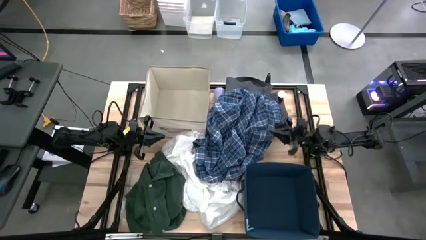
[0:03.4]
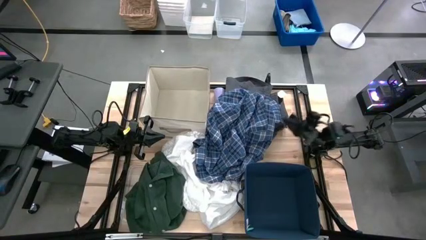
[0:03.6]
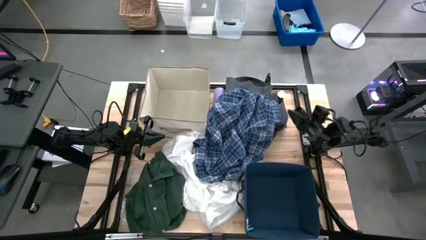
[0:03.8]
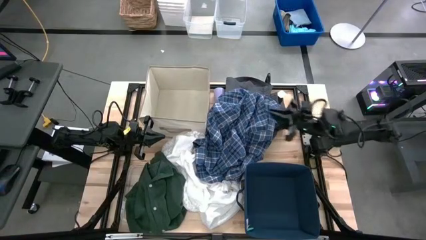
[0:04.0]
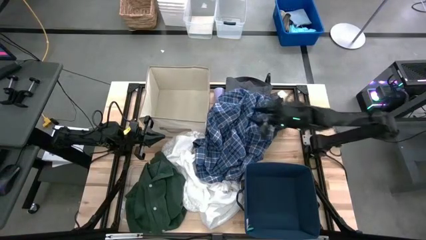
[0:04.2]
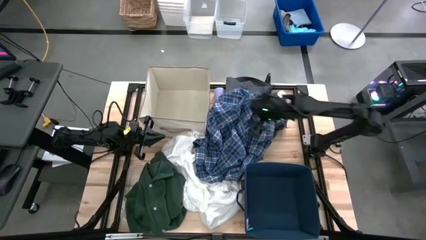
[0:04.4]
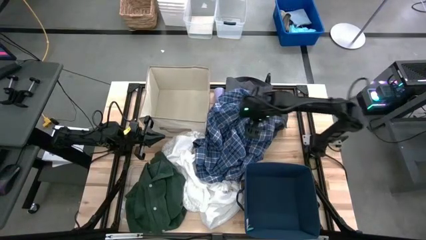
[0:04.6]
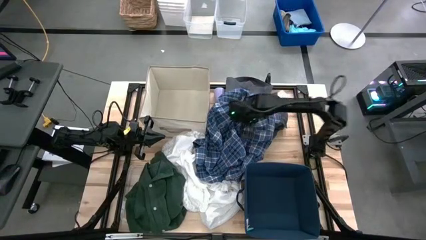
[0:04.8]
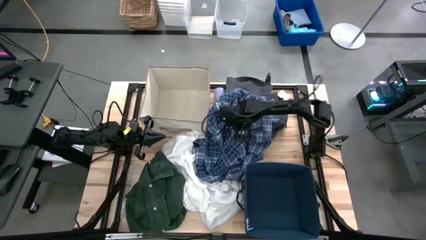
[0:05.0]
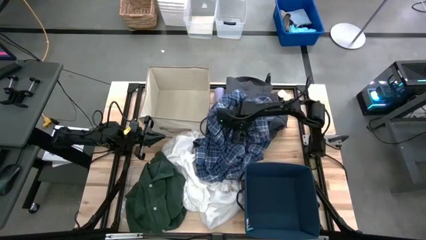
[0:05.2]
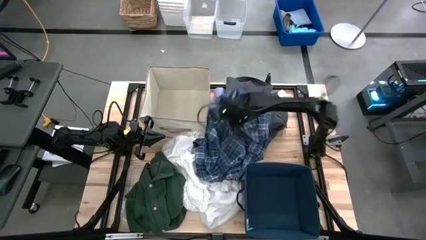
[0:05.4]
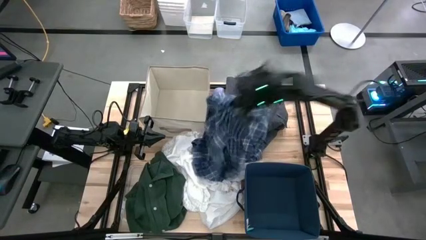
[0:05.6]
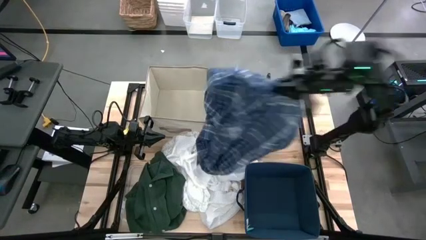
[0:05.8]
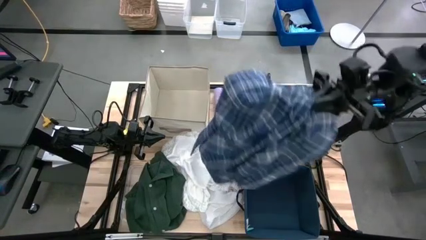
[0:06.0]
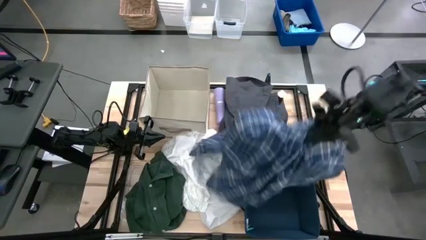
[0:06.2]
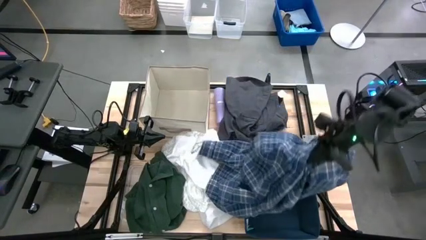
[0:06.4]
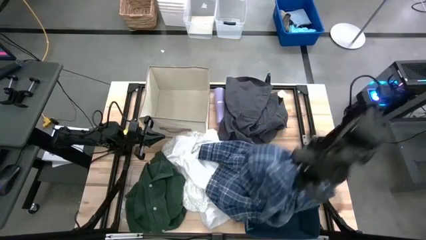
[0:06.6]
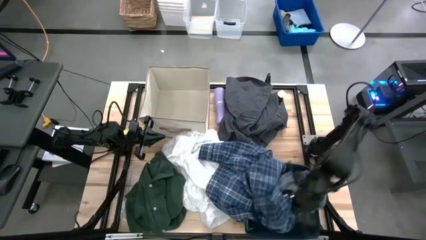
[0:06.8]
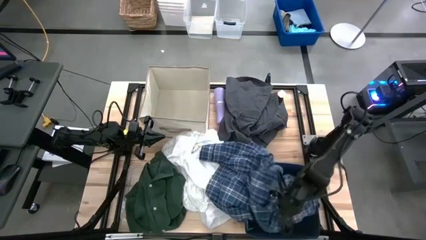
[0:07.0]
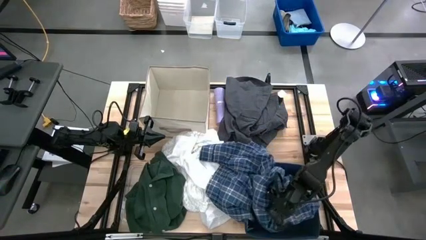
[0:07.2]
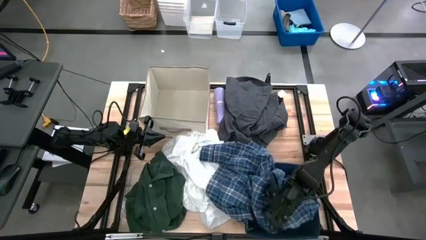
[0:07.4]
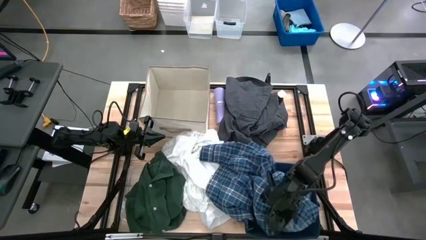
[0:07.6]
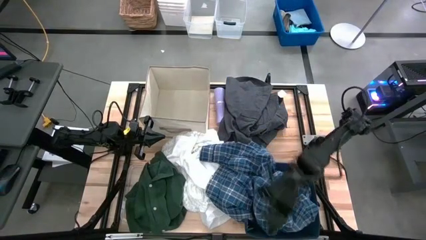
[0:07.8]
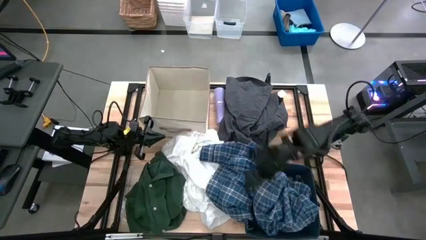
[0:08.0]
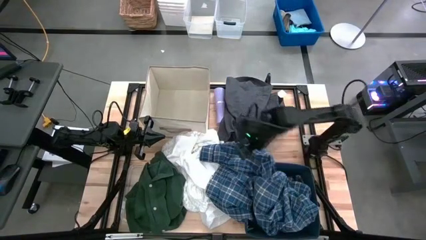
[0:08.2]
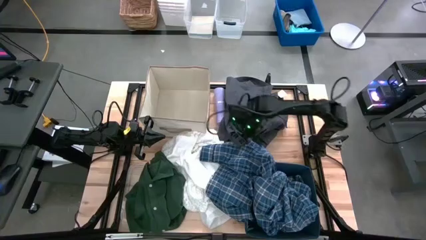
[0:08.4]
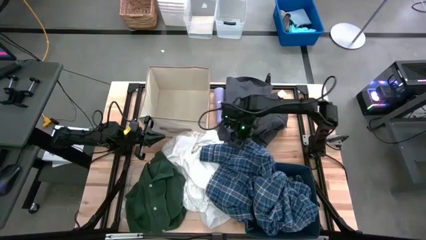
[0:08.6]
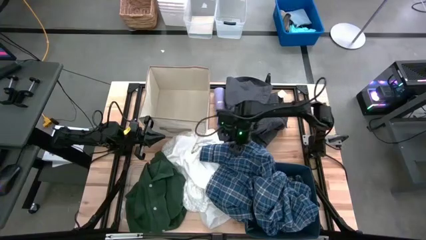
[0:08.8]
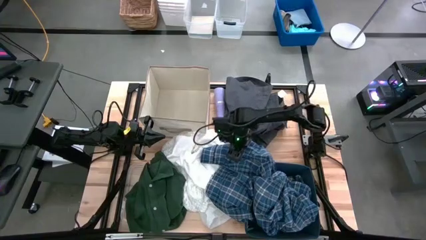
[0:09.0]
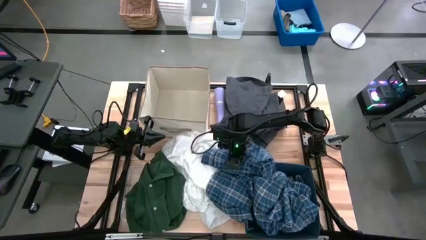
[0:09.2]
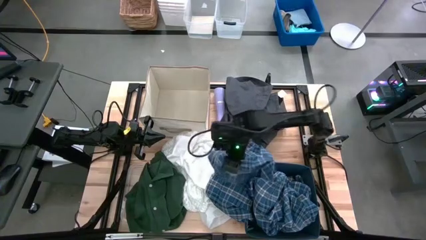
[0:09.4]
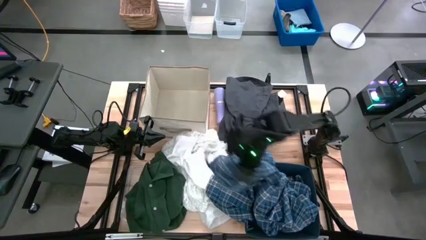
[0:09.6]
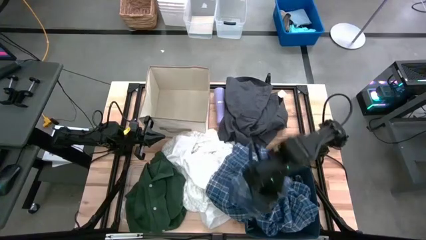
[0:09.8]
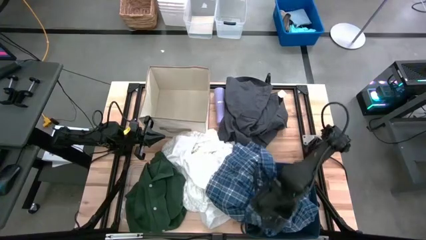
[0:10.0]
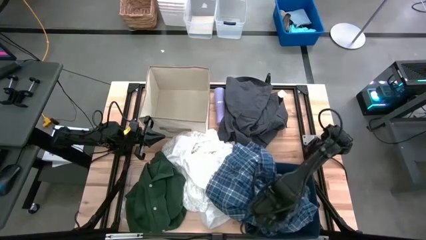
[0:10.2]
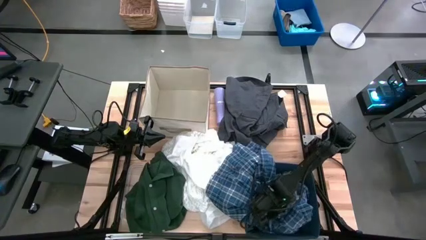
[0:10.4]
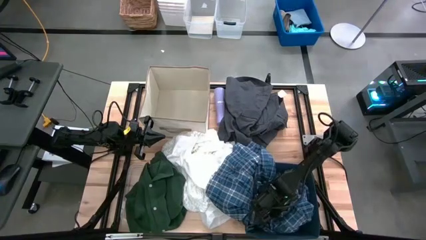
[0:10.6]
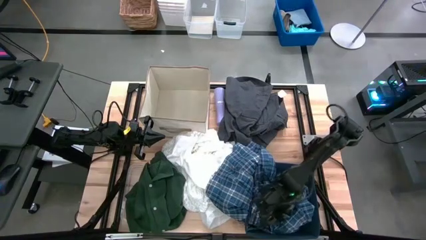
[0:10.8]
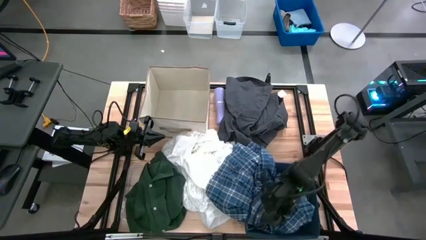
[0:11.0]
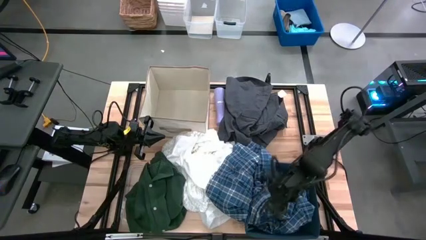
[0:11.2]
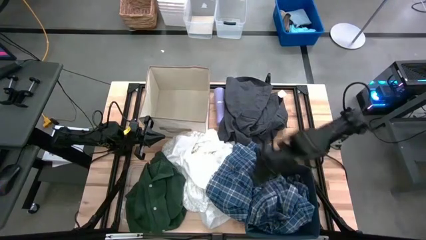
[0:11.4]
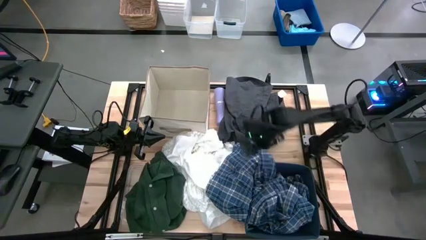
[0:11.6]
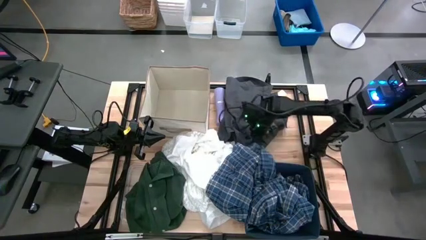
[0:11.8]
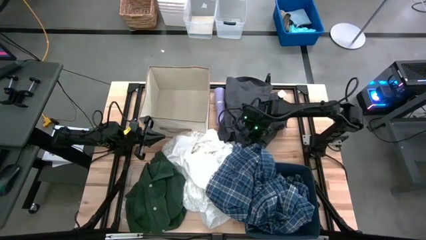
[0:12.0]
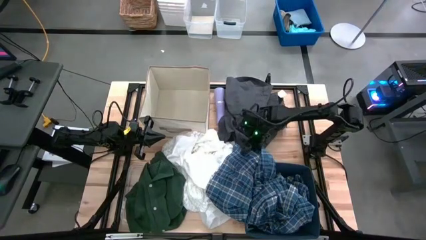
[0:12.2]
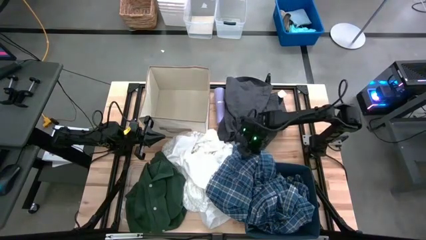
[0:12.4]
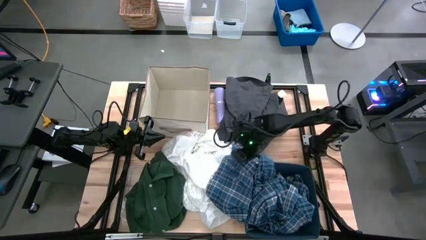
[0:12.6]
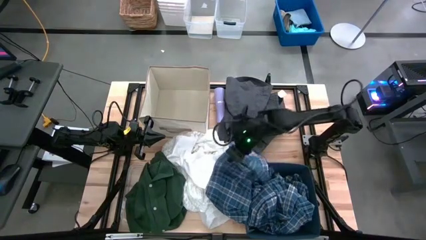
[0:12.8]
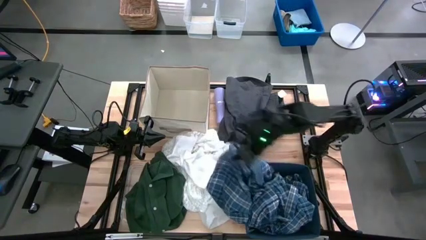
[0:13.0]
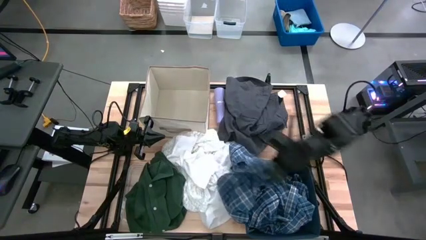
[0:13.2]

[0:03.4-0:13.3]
Task: Sort clothes
Put the blue shirt into the blue laundry organizer
